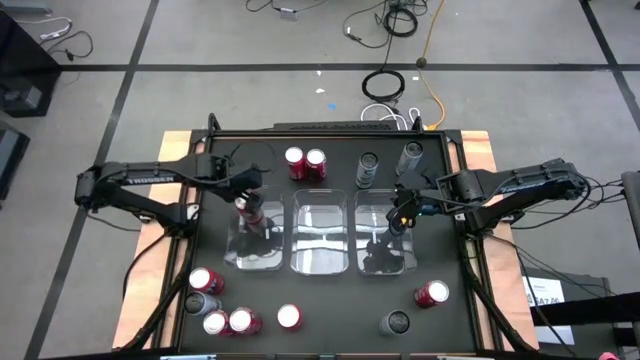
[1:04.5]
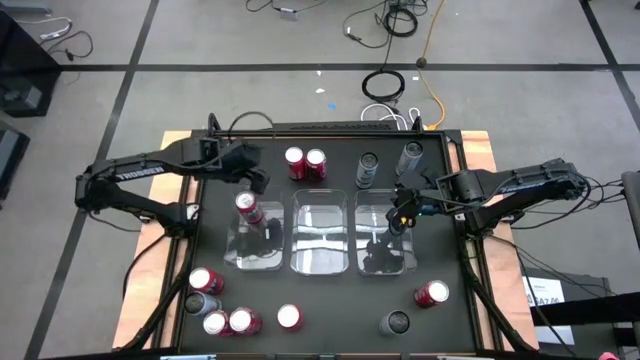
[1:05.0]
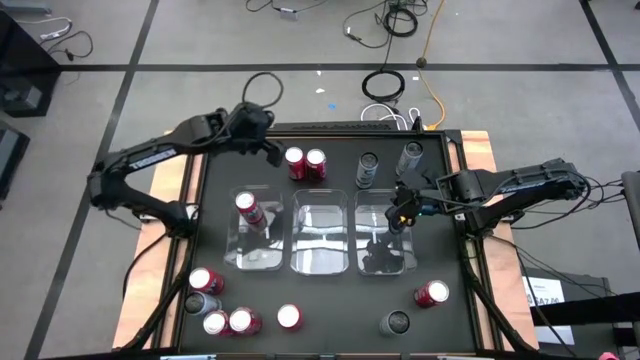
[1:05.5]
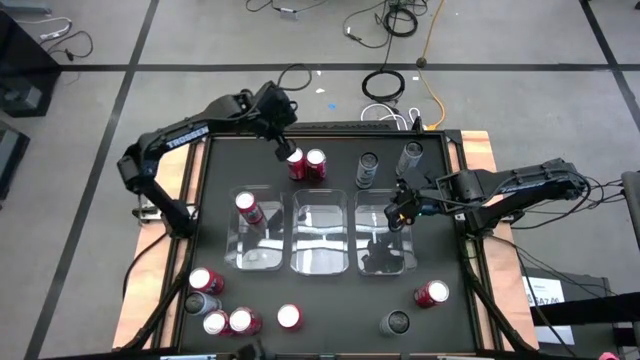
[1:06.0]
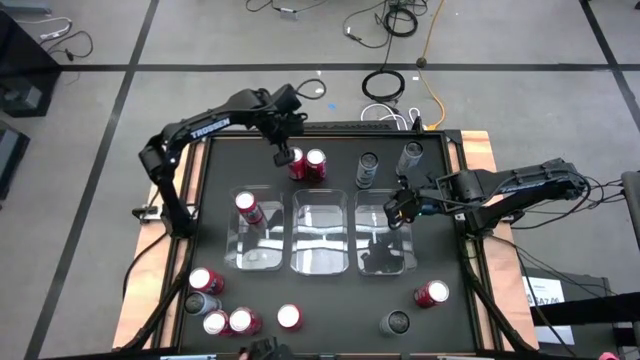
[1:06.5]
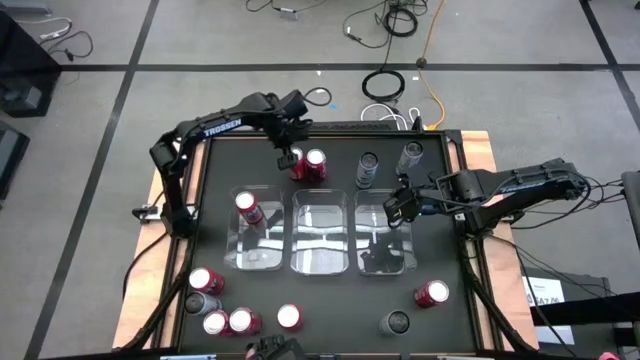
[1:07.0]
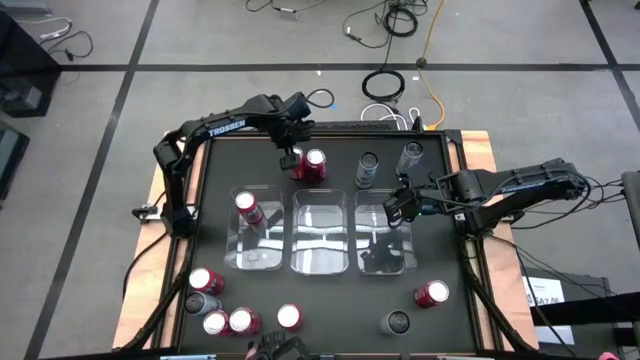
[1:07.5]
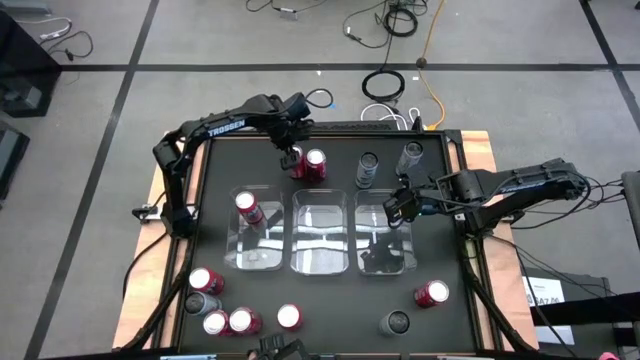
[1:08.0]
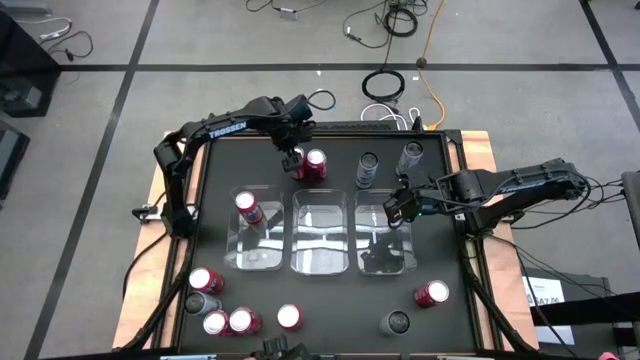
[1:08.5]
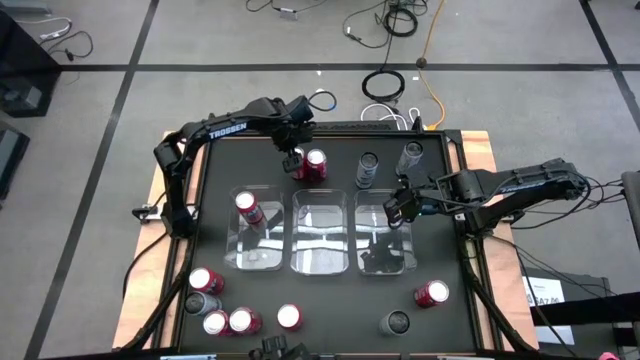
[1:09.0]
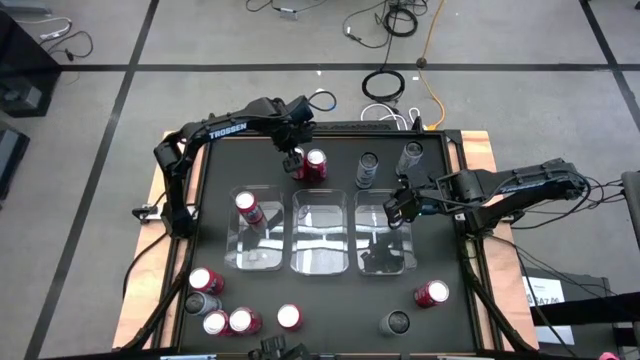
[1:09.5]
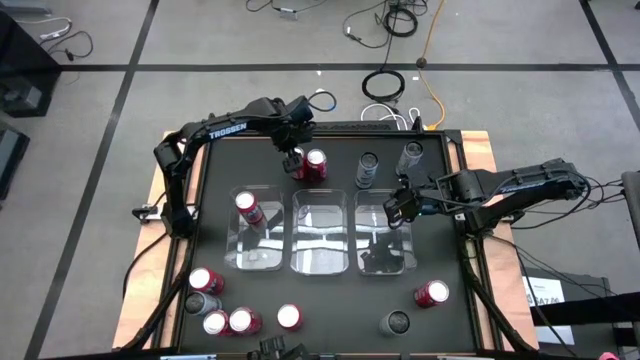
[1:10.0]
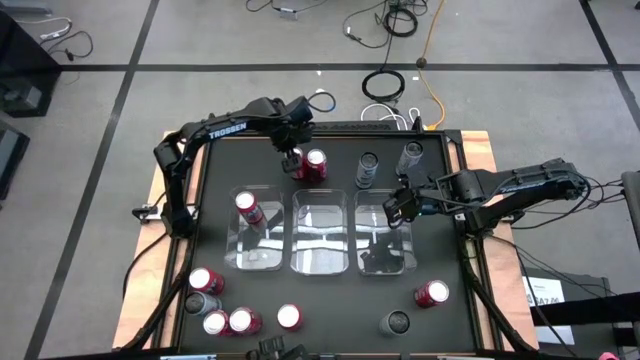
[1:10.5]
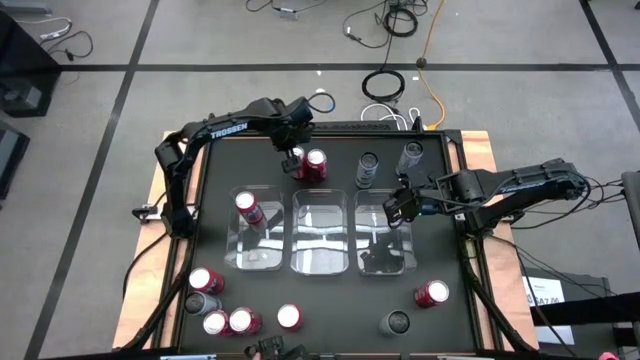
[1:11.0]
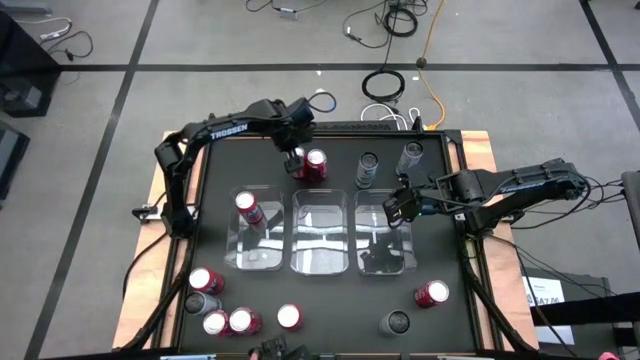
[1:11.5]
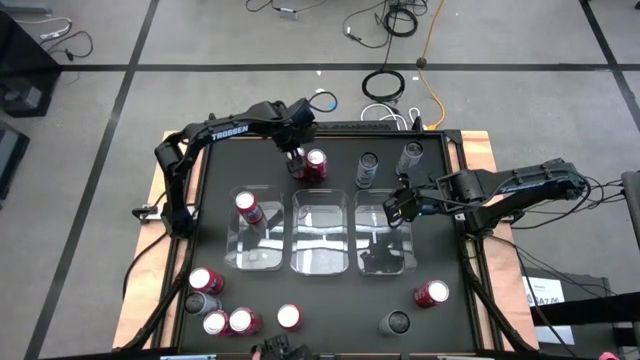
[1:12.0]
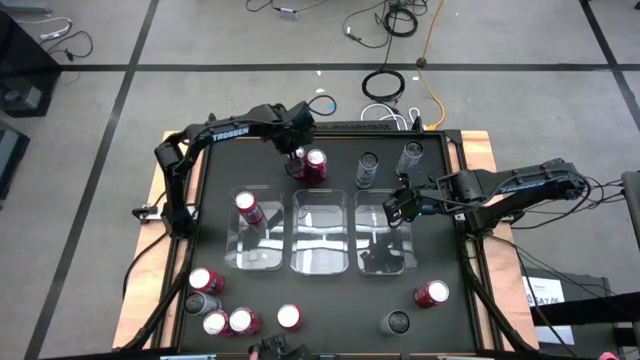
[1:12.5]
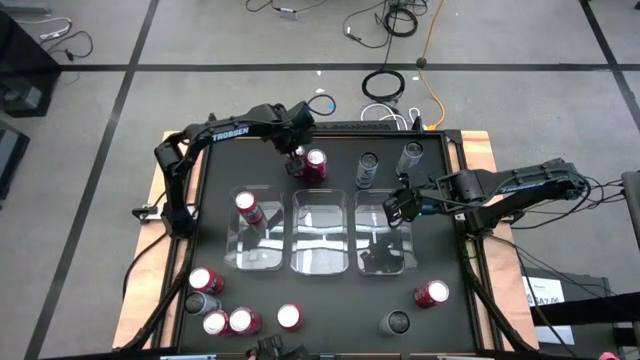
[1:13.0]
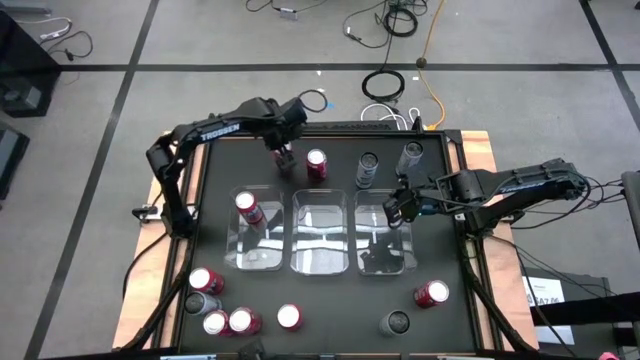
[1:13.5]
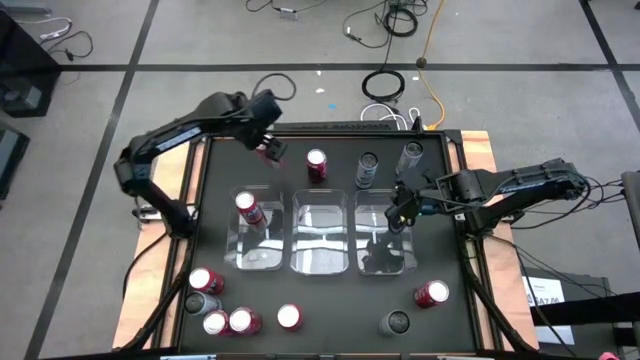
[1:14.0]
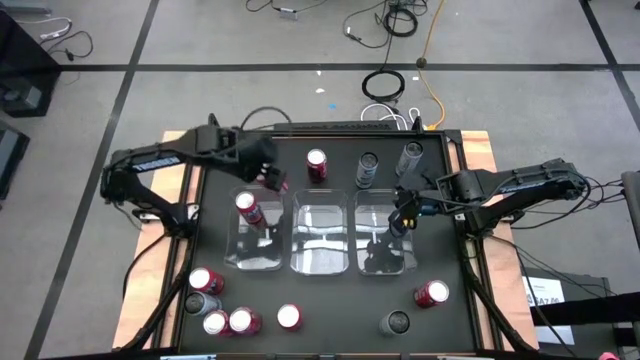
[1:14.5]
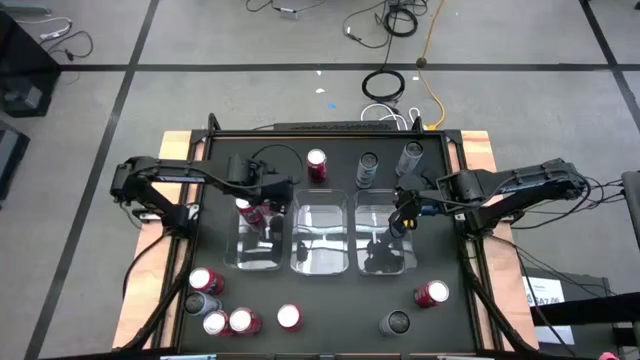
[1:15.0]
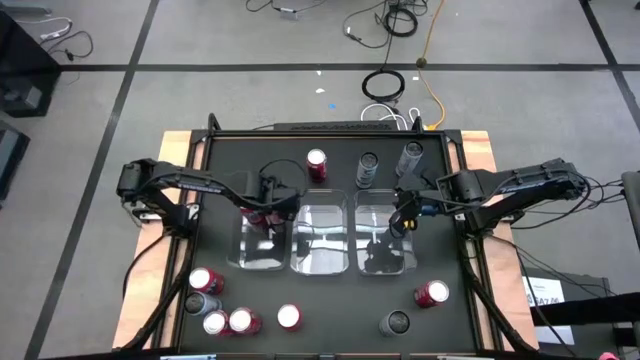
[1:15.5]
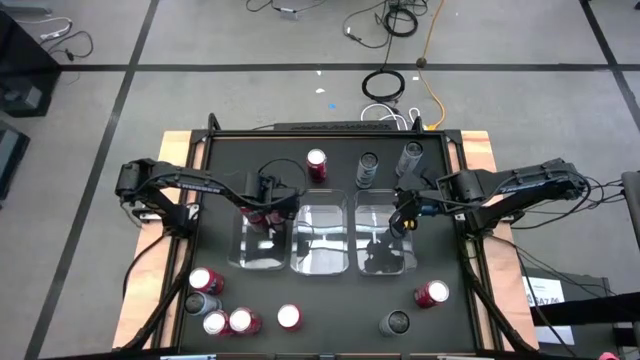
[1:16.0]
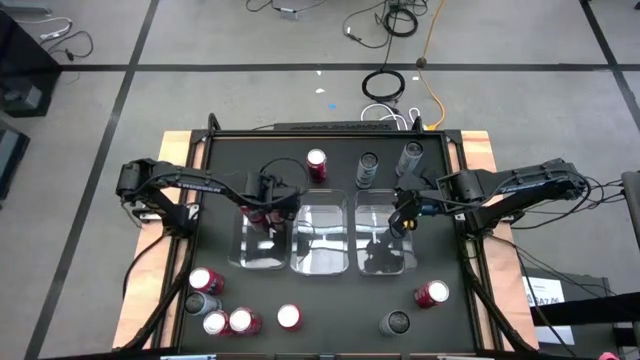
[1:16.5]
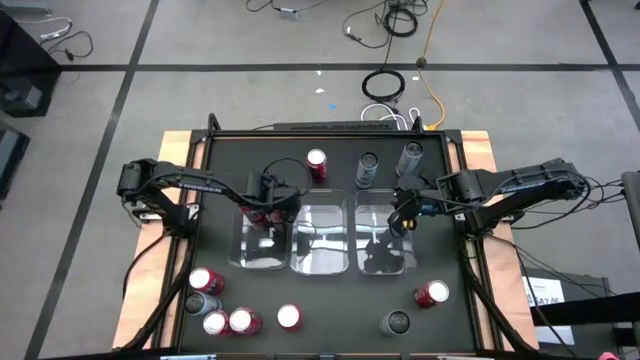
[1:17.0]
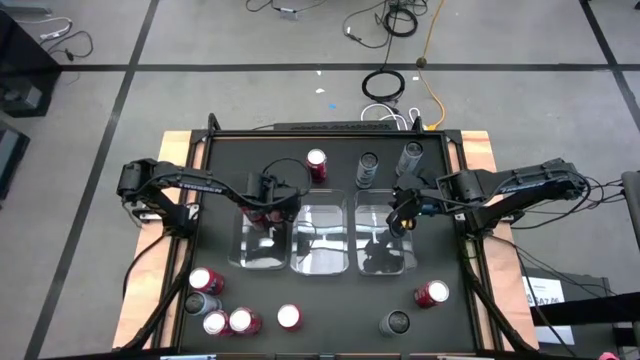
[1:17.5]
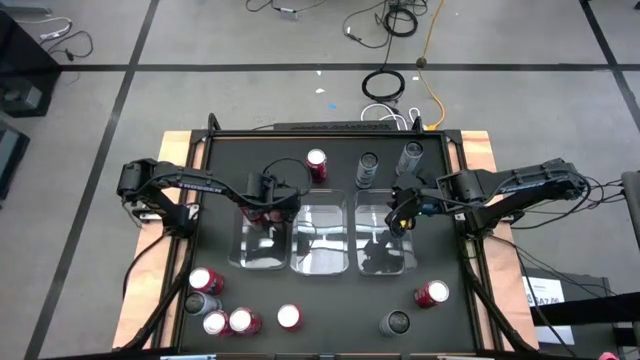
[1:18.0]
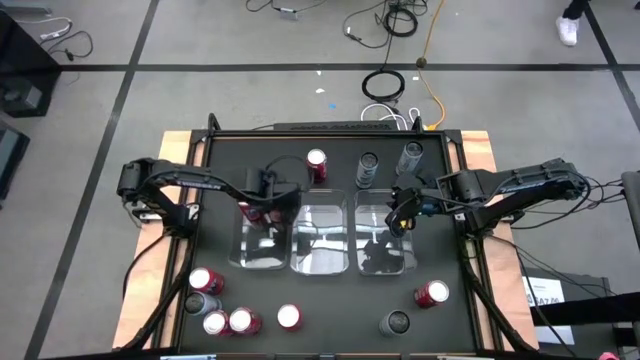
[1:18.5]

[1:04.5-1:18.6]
Task: Sort soda cans
Put the top red soda can into the middle transparent bin

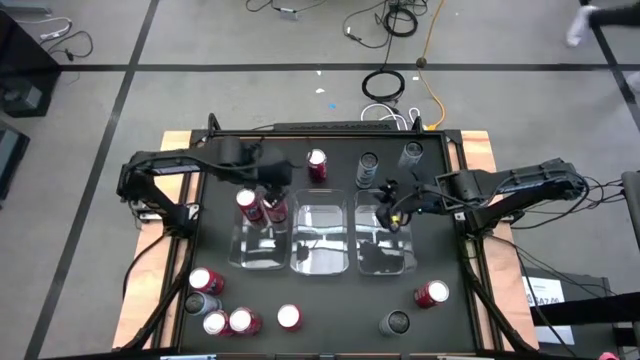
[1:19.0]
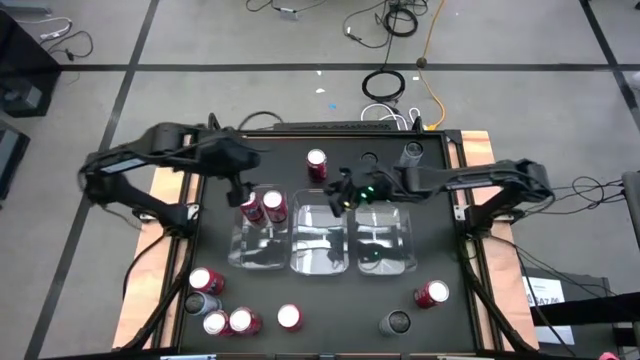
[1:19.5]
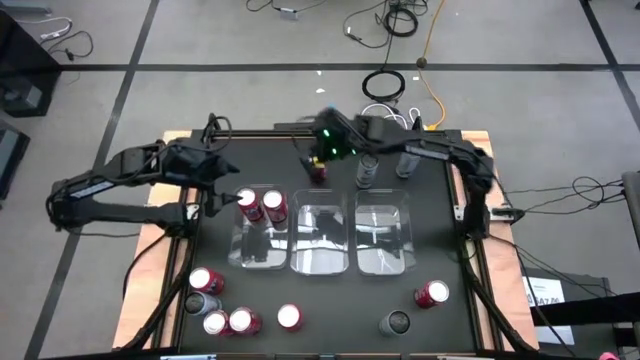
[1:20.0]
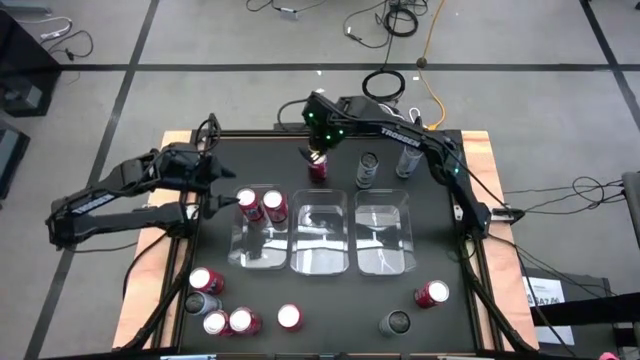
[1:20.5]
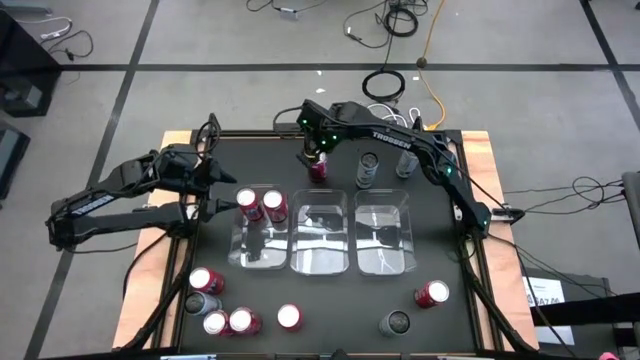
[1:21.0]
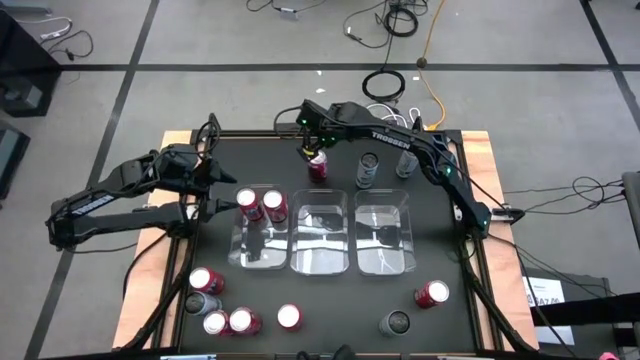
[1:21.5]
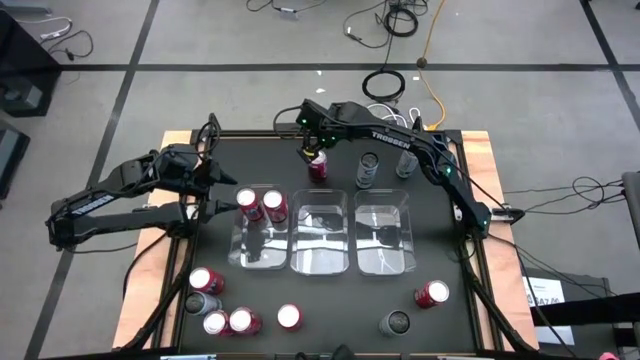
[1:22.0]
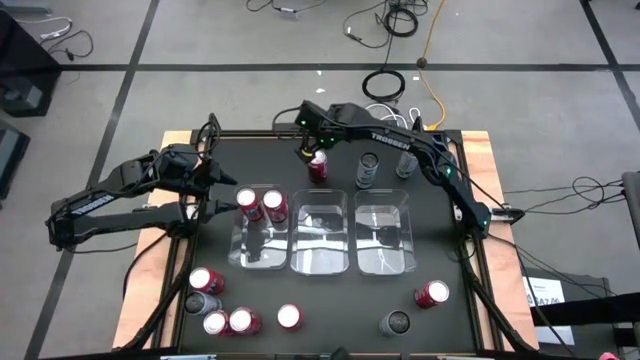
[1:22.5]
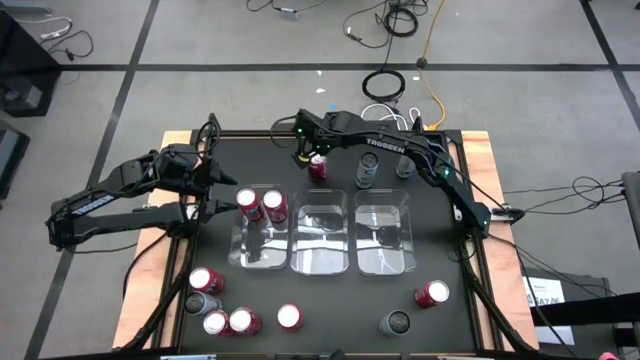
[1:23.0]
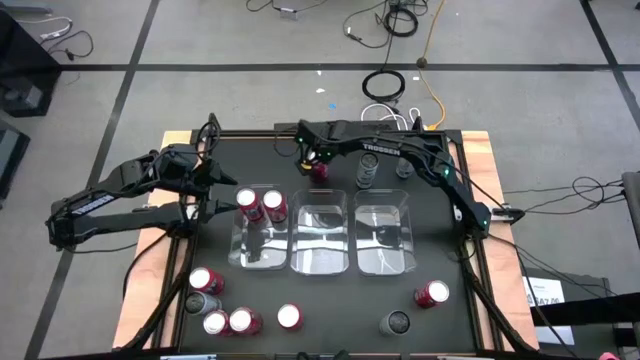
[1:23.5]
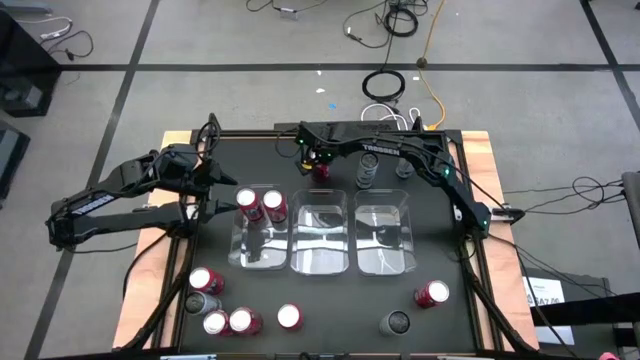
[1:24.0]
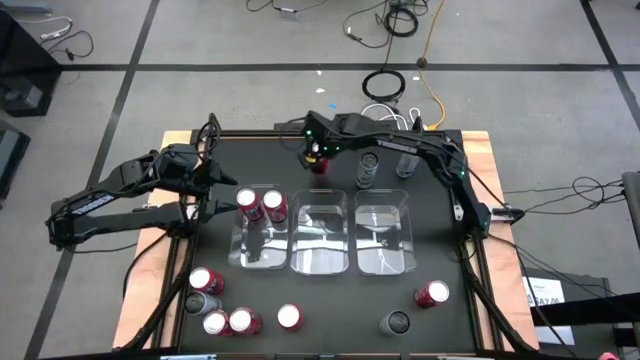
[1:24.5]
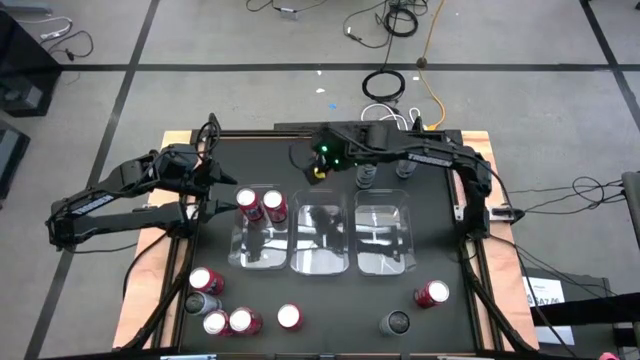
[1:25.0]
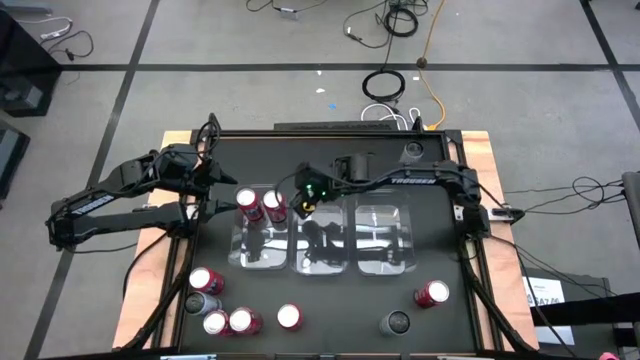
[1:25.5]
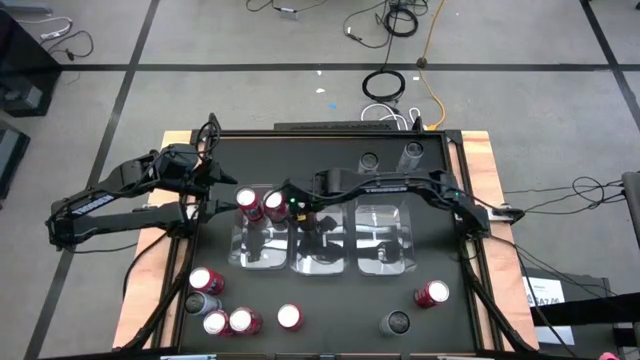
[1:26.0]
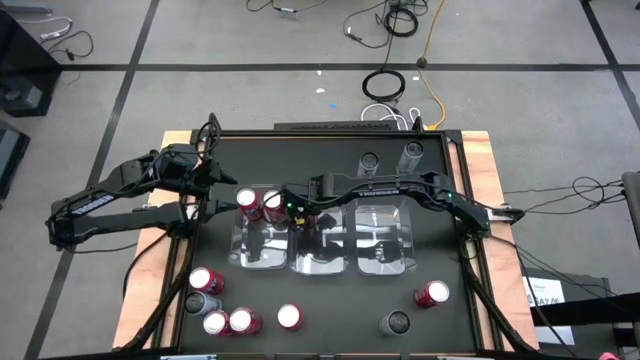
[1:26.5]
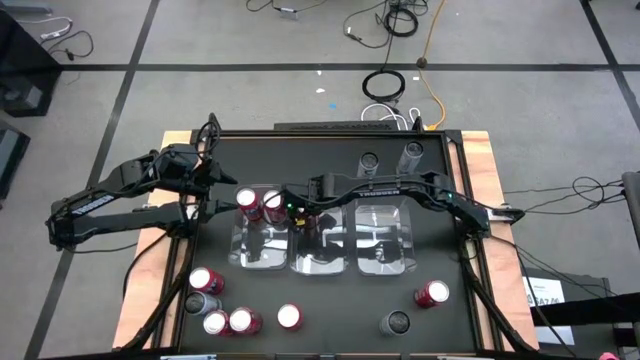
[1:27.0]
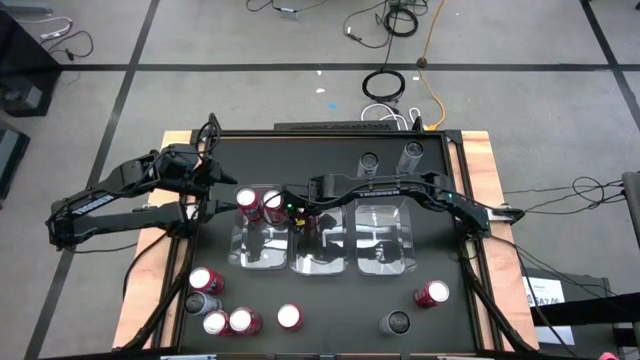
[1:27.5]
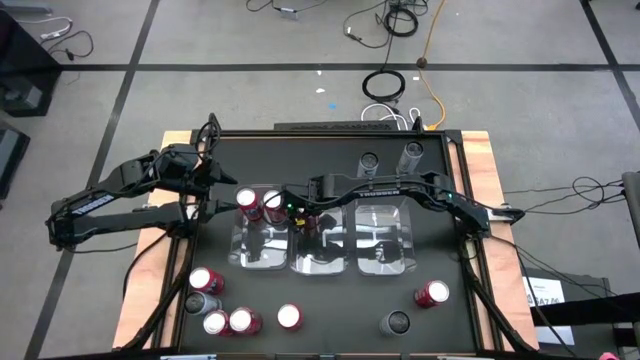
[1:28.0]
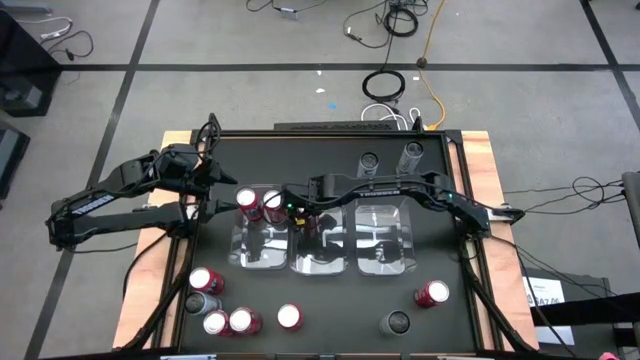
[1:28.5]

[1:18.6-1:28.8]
Put the top red white soda can into the left transparent bin
